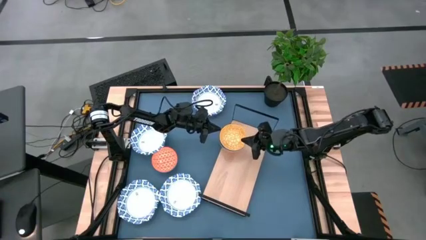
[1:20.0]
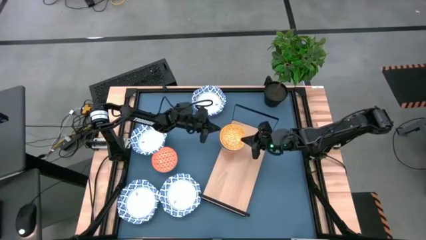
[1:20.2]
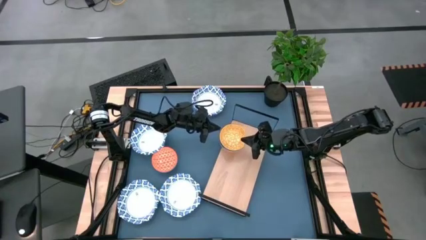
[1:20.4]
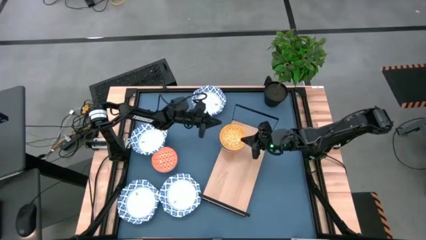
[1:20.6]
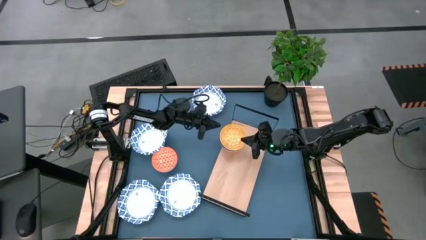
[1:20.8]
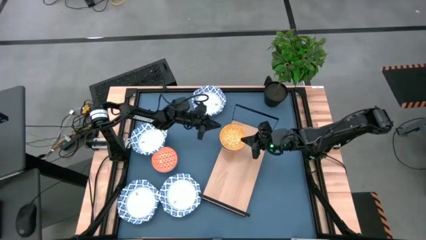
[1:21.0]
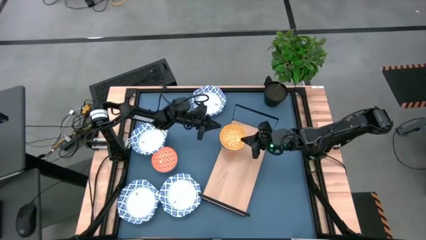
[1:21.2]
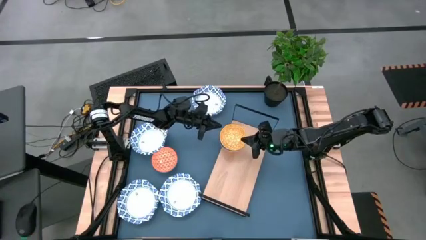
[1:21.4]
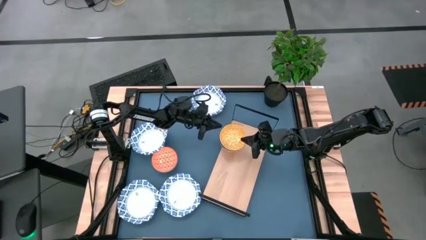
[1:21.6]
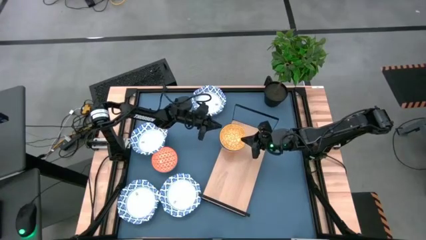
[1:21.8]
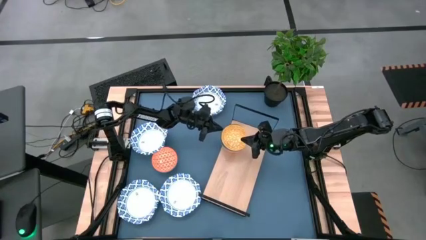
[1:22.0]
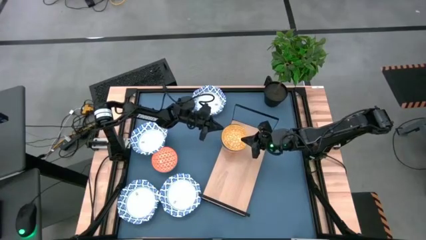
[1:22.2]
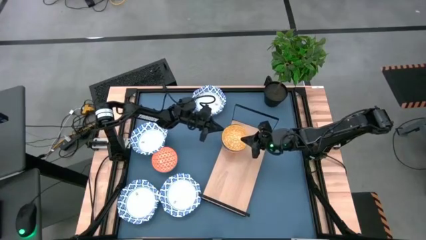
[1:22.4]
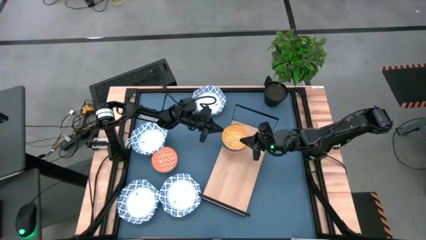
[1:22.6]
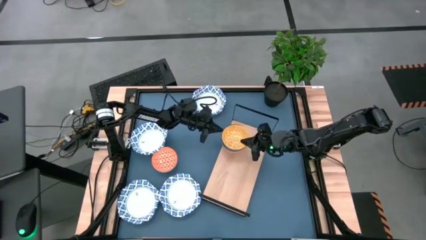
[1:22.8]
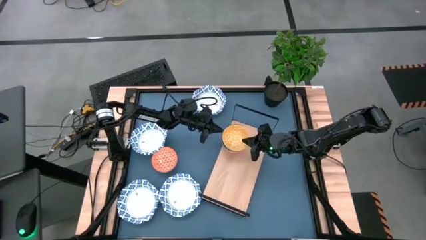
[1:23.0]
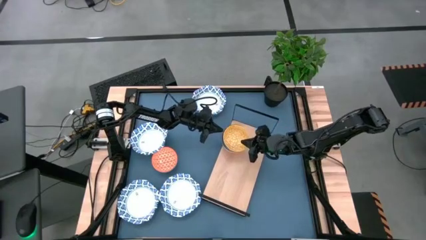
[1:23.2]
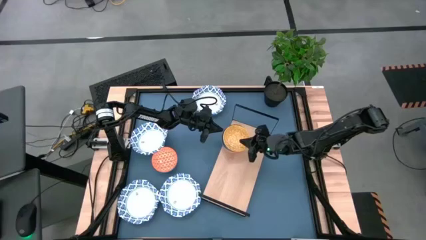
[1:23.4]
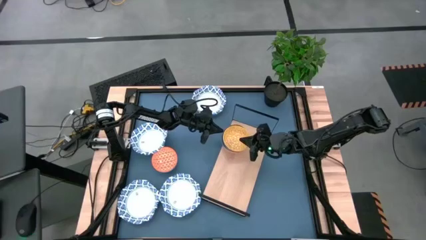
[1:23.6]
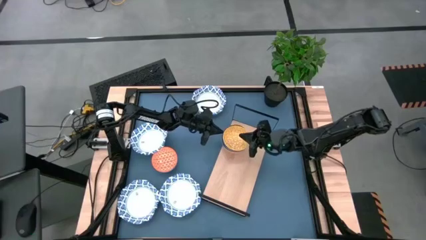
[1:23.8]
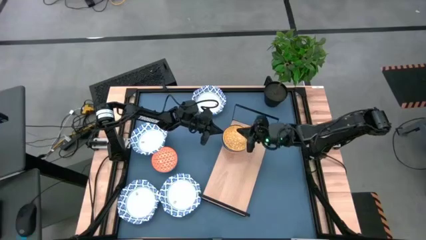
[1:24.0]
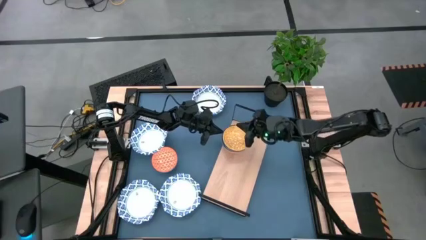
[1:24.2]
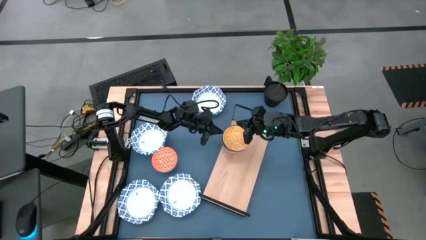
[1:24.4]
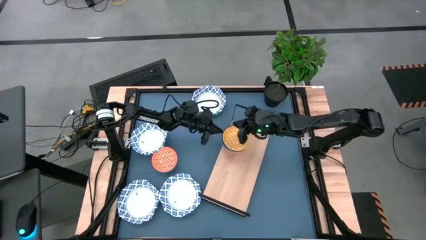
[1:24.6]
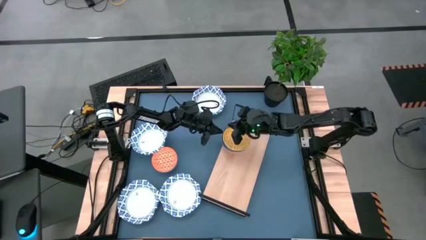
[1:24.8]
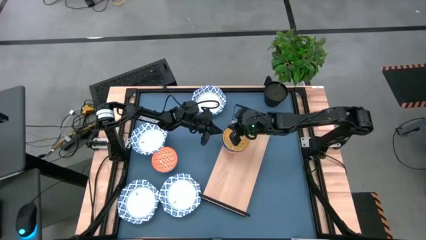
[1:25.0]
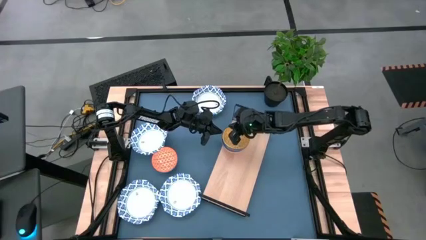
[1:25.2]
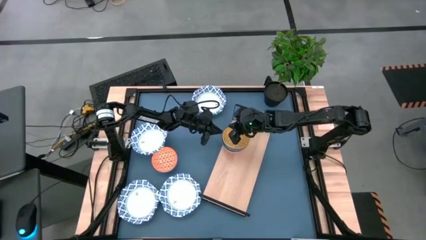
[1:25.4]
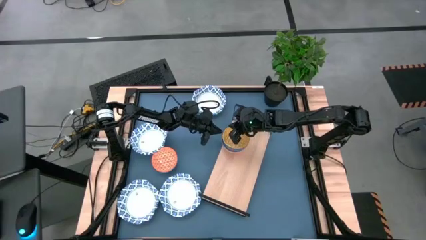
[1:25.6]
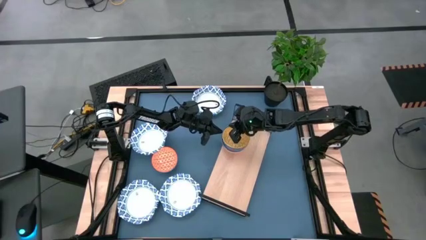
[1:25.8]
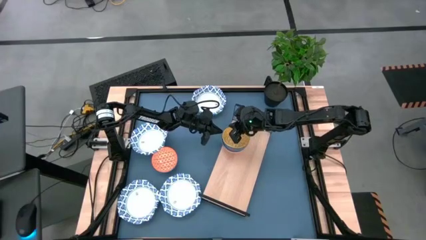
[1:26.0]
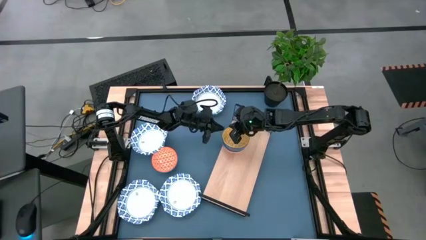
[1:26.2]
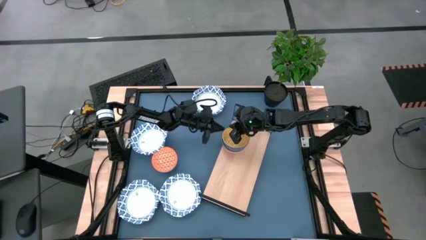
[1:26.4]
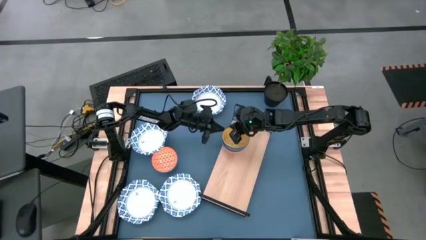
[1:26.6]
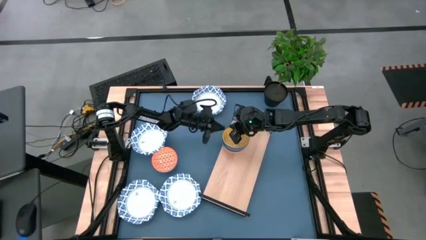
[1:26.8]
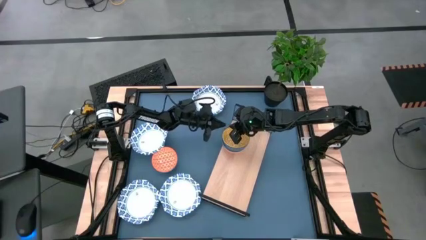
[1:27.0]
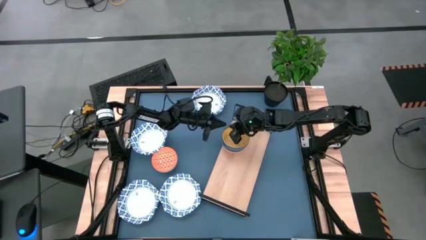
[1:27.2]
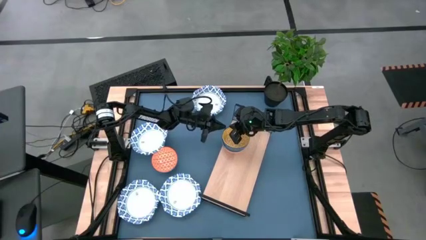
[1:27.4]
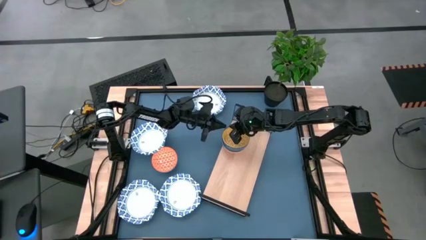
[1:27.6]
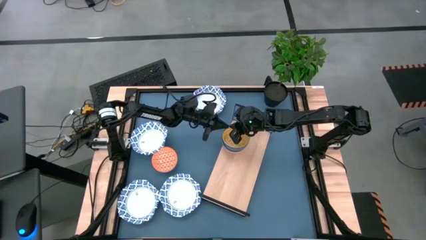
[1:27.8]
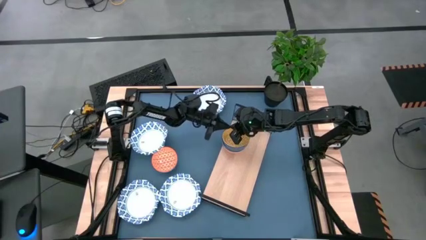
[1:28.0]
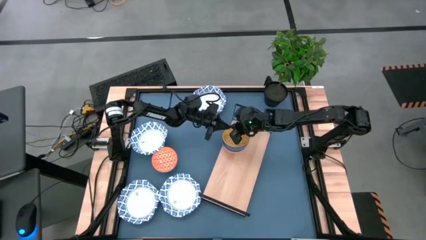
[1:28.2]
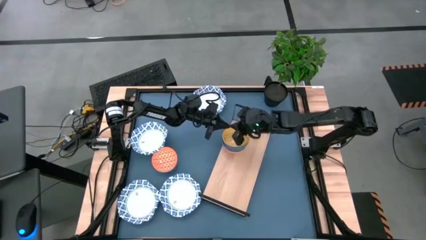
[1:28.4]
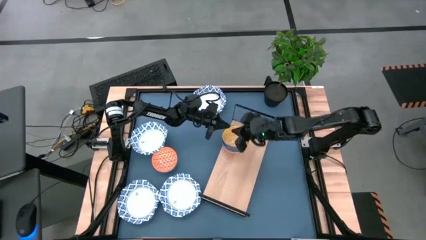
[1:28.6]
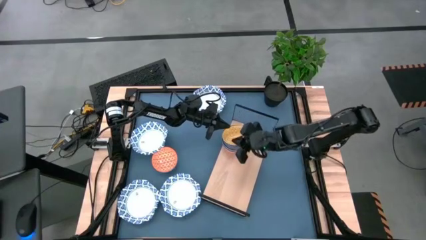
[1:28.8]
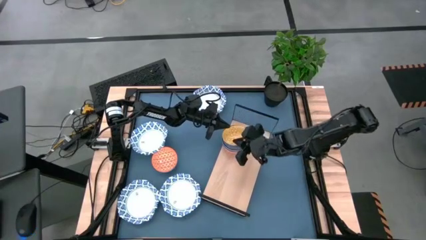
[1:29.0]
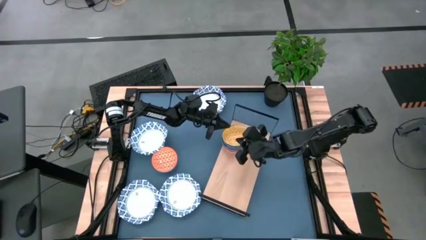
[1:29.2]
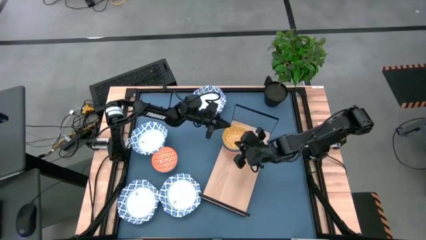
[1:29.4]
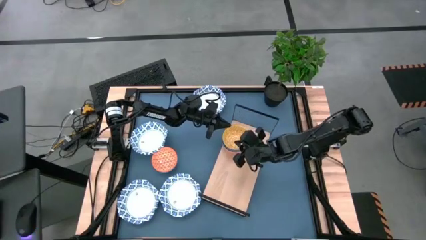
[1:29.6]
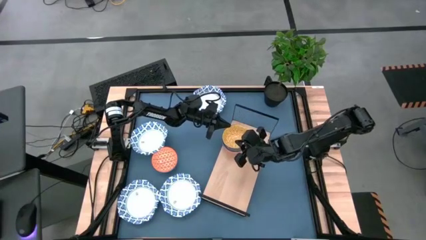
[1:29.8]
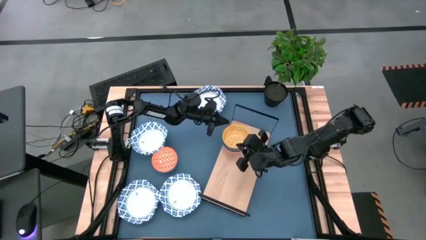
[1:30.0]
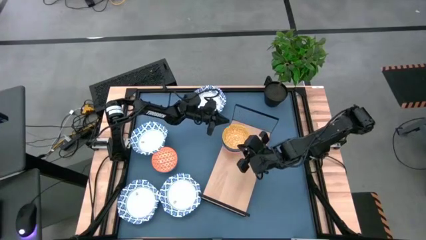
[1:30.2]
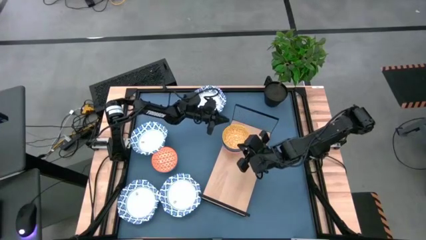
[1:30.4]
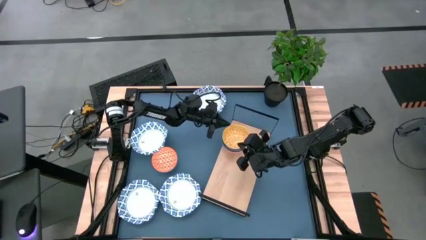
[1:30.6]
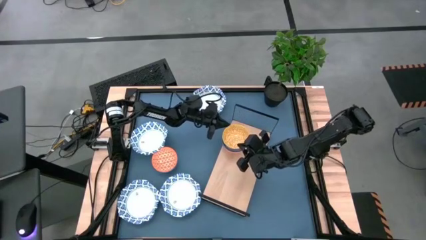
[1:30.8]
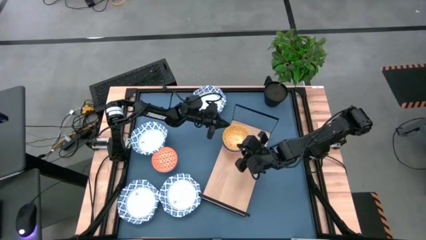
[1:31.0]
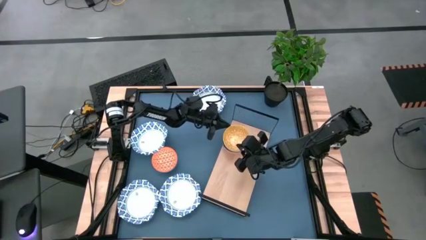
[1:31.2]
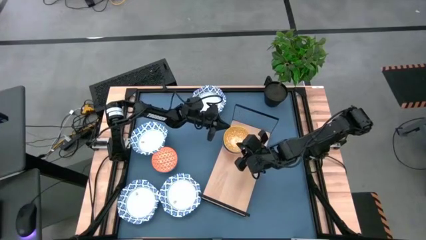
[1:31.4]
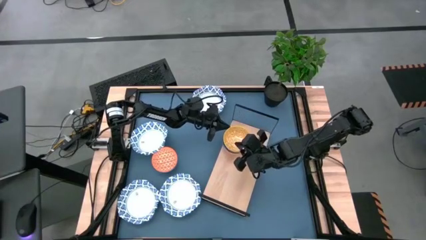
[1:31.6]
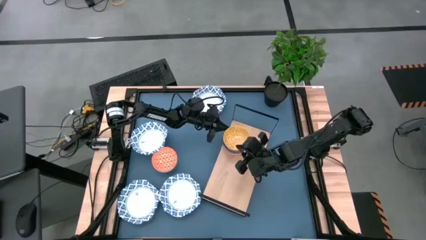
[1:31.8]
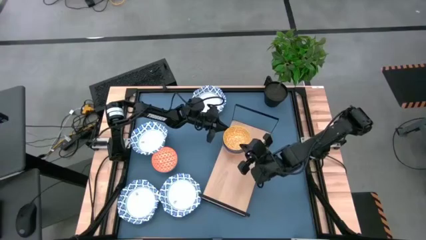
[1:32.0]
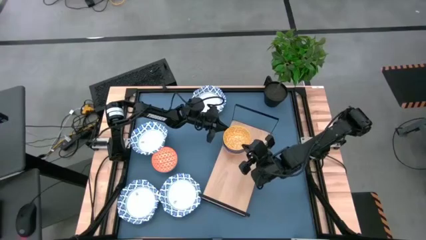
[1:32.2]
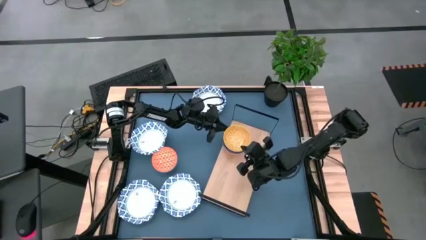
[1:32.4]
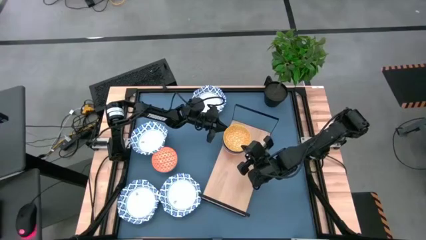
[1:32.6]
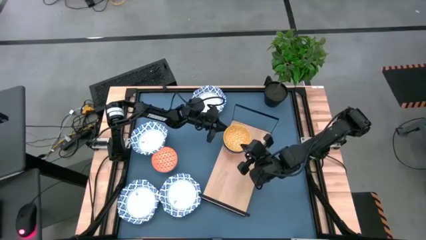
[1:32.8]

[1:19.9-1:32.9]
Task: Place and stack bowls onto a shelf
Adjust the stacked bowls on the shelf

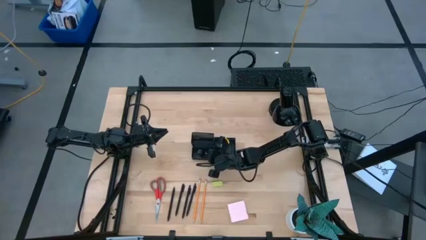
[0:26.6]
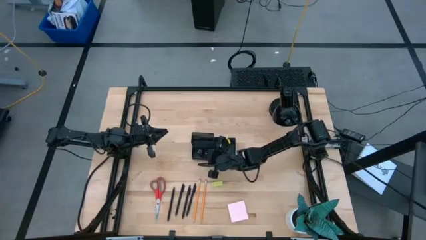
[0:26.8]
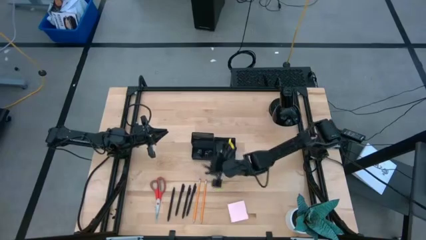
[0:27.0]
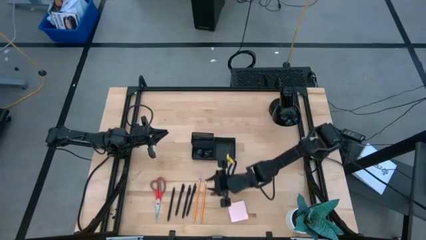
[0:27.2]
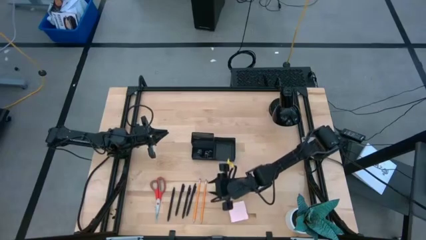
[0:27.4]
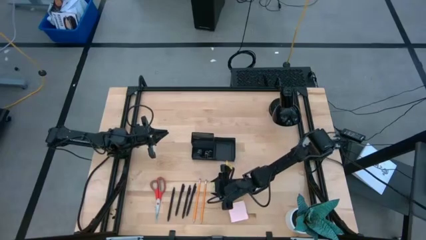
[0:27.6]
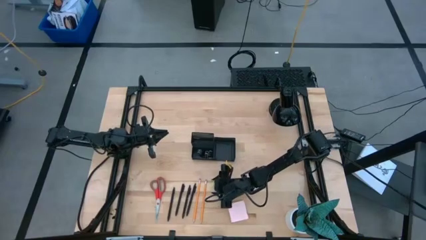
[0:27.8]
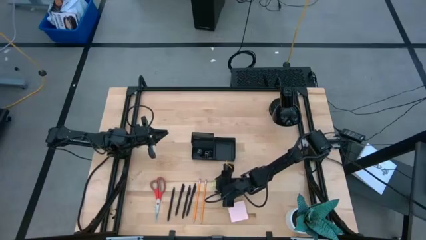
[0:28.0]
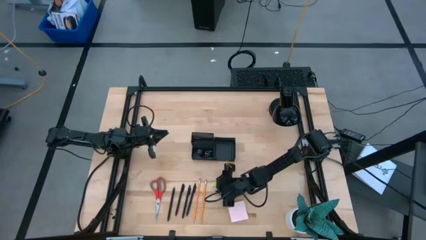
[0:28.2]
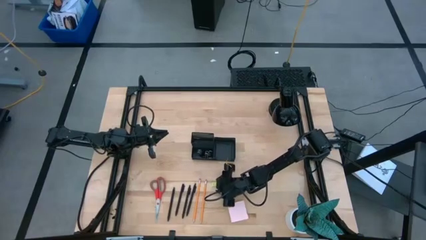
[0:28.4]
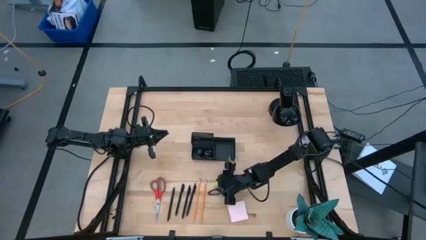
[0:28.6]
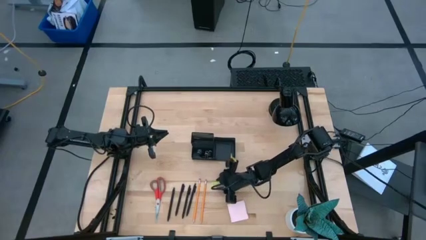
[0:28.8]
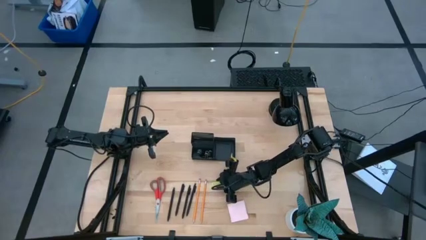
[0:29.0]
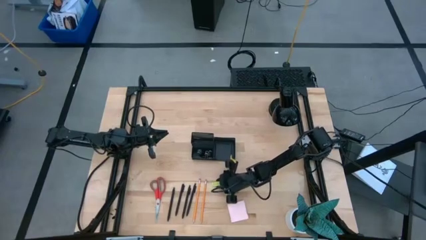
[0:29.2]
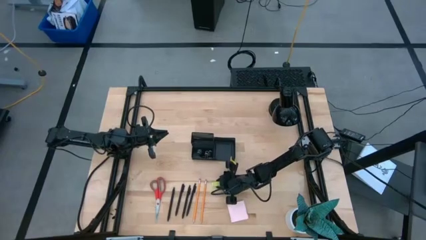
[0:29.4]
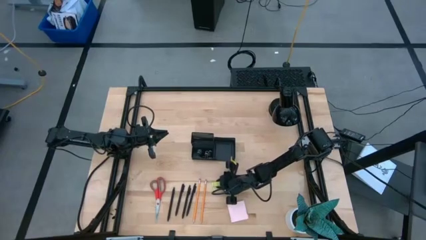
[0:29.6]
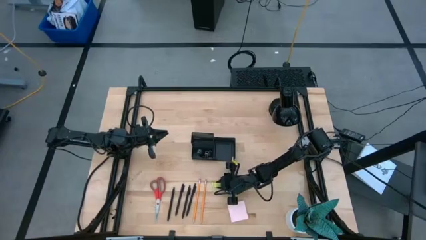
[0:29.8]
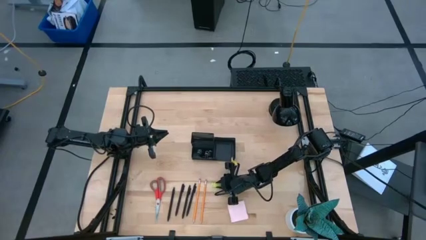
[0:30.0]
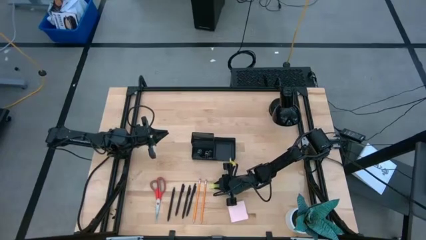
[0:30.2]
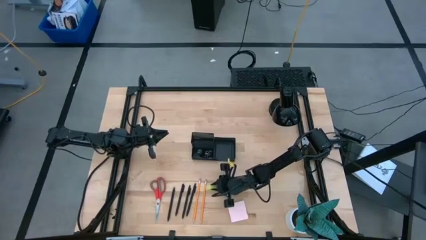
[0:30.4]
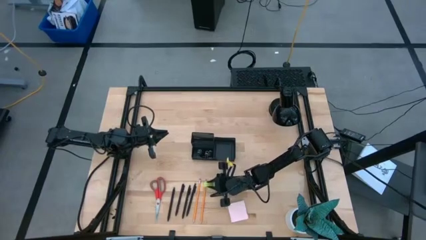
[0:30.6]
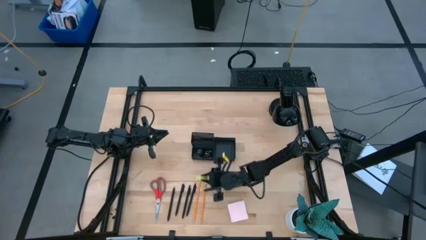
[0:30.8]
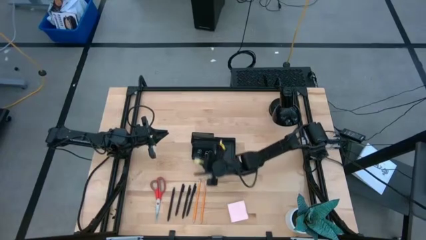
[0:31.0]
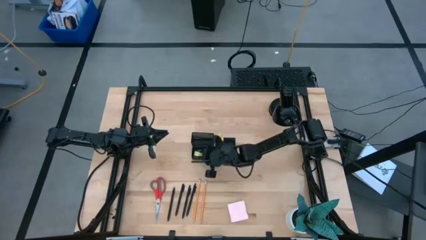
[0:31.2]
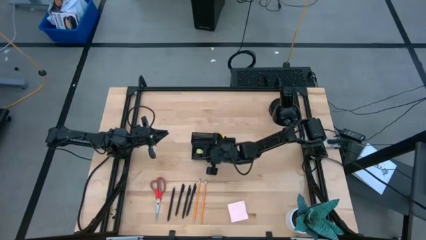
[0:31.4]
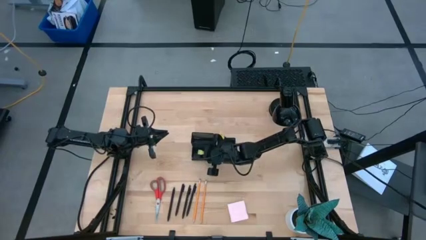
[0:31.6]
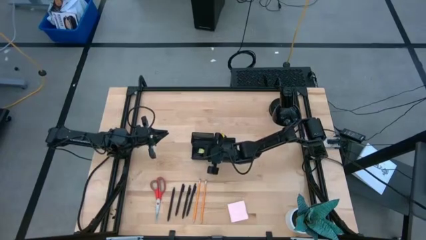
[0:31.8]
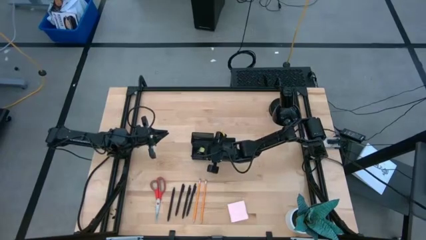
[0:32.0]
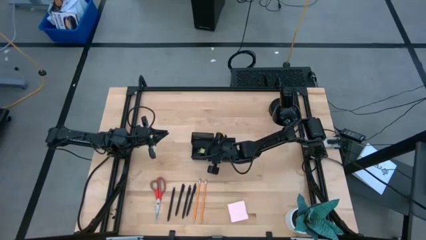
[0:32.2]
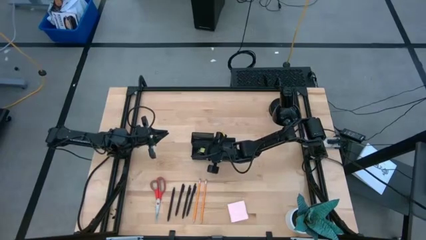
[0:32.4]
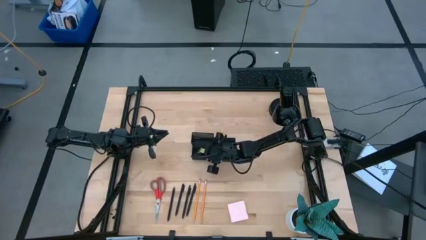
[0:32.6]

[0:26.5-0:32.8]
Task: Pick and place office supplies into organizer
Put the yellow eraser into the black desk organizer
